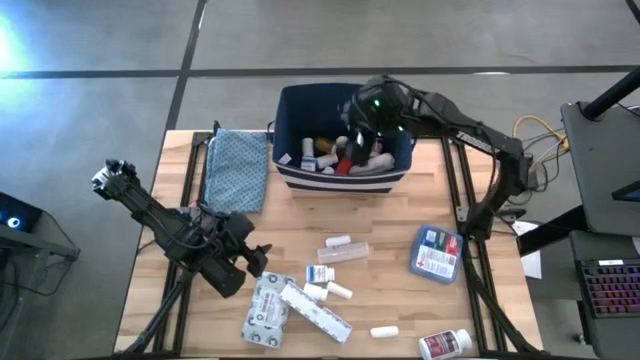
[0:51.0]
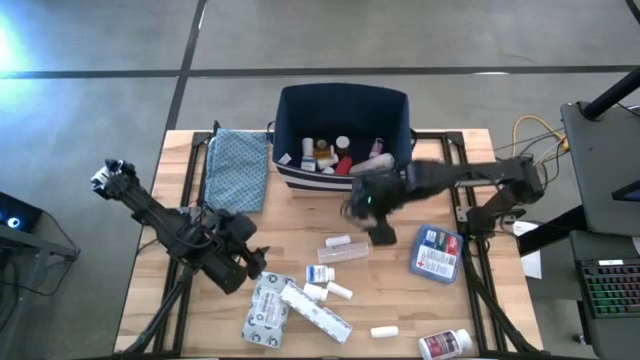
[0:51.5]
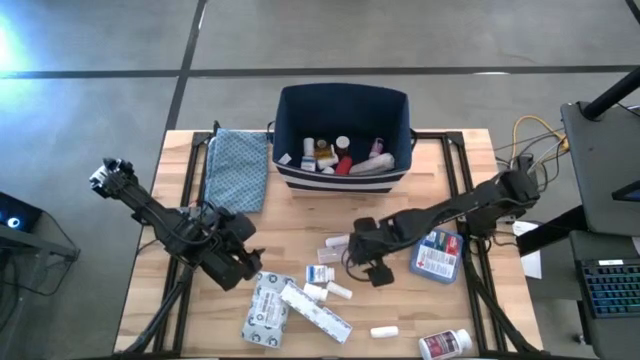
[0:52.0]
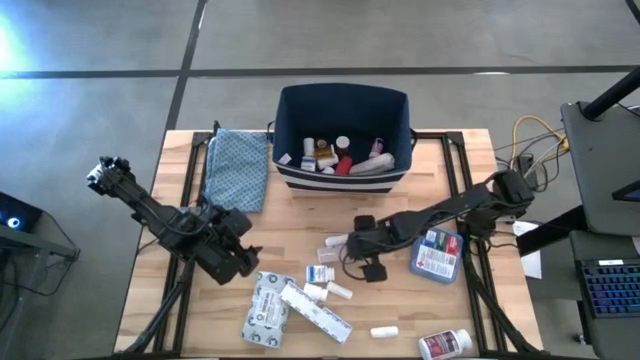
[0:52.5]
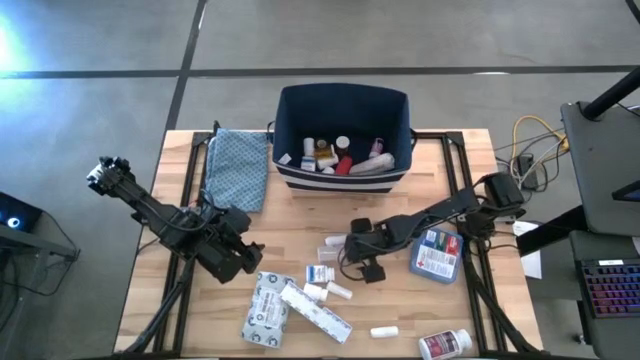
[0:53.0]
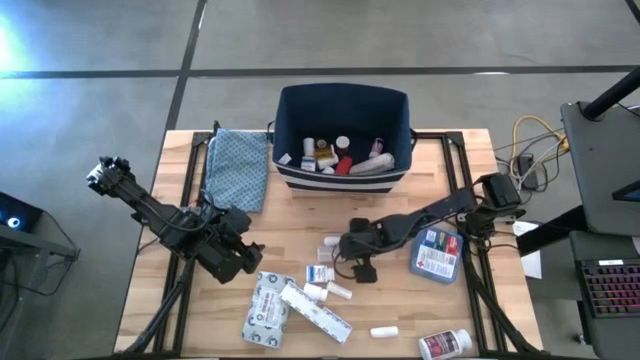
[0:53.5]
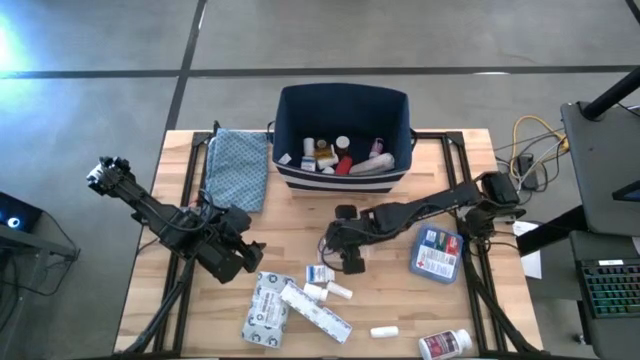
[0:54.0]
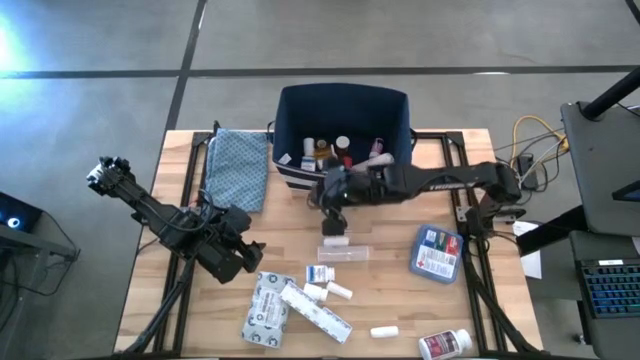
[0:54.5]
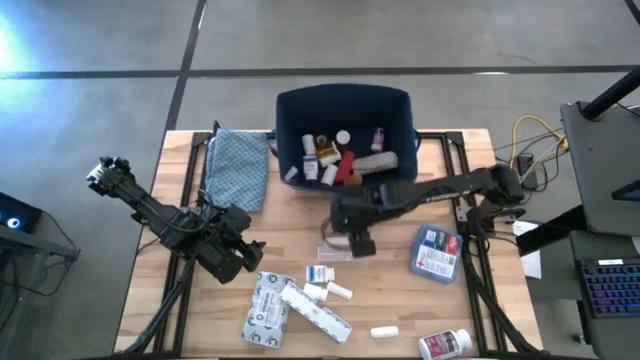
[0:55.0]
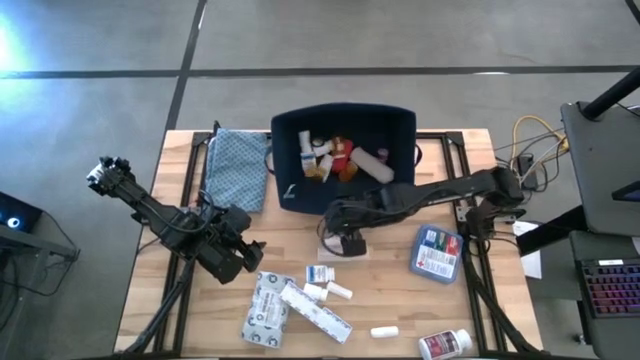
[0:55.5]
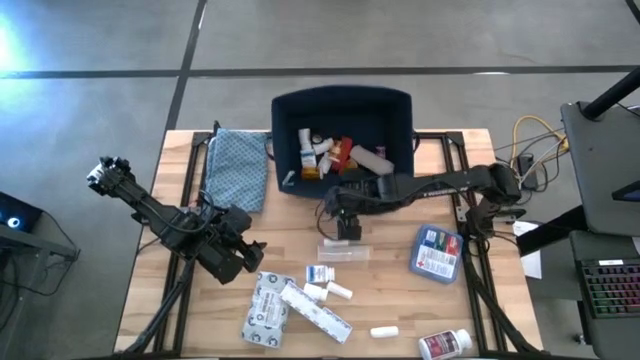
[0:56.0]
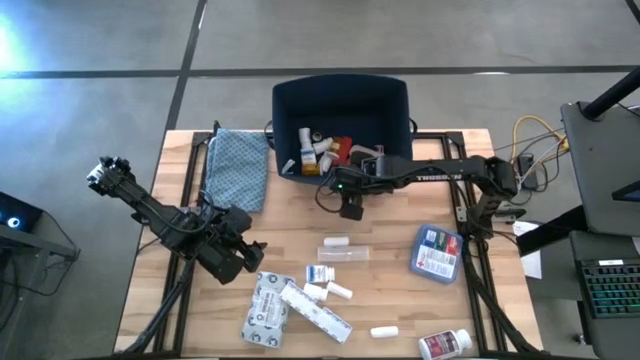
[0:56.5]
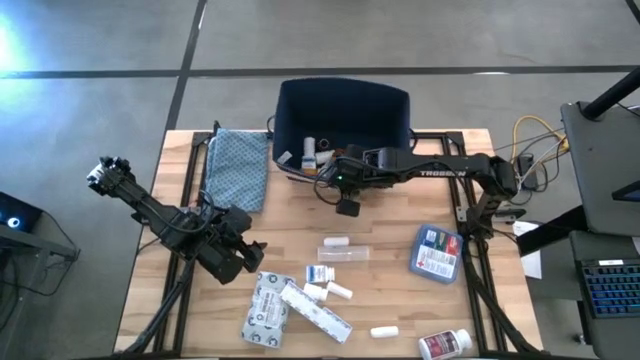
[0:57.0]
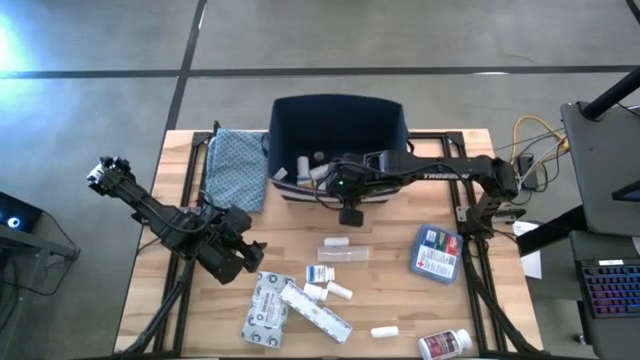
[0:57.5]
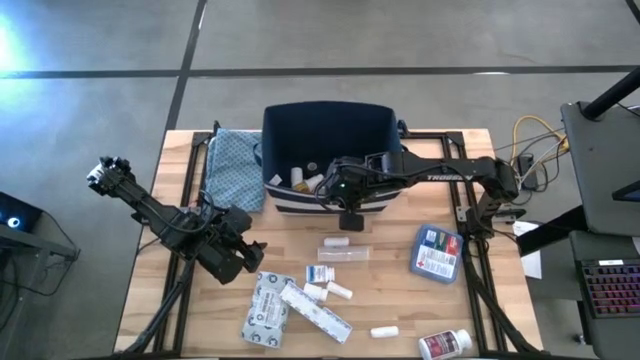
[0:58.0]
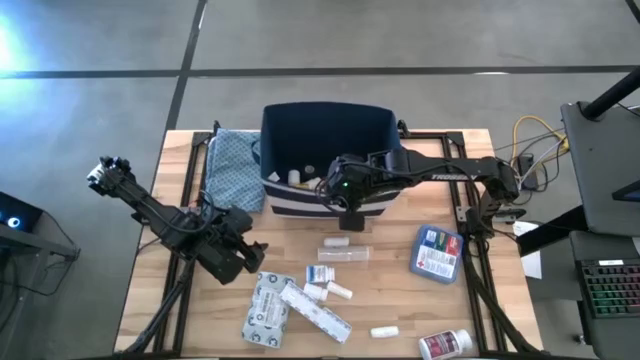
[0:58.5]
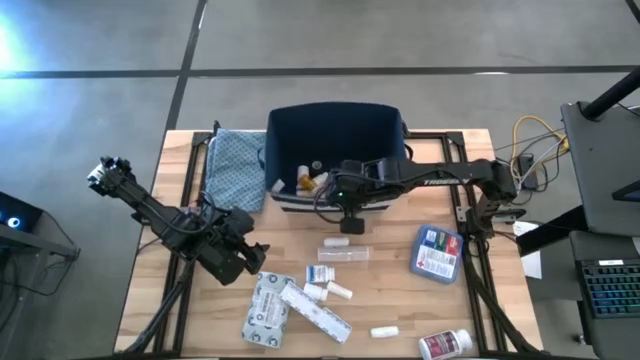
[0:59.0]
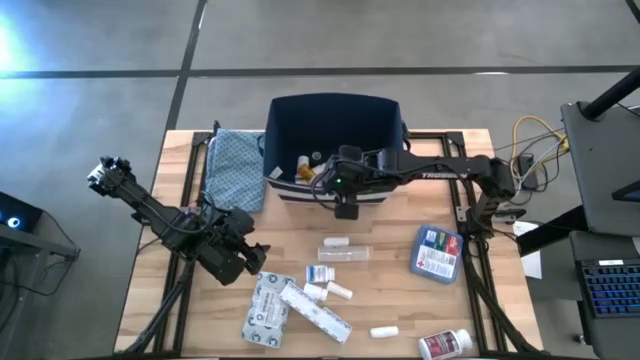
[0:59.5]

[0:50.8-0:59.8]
Task: Pick & place medical supplies in basket/bin
Adjust the bin on the top table

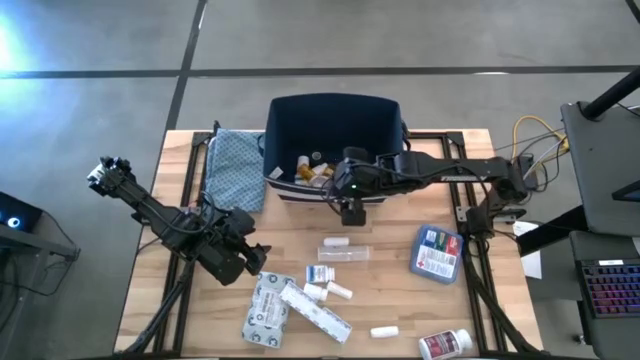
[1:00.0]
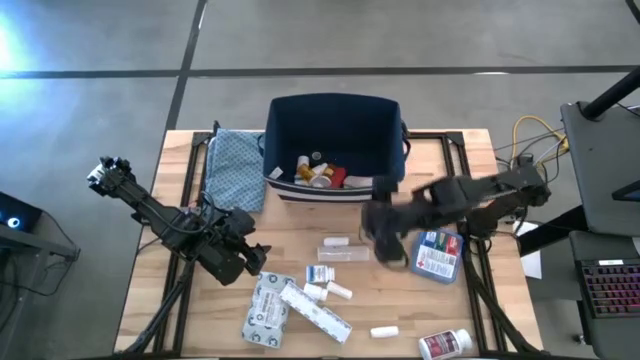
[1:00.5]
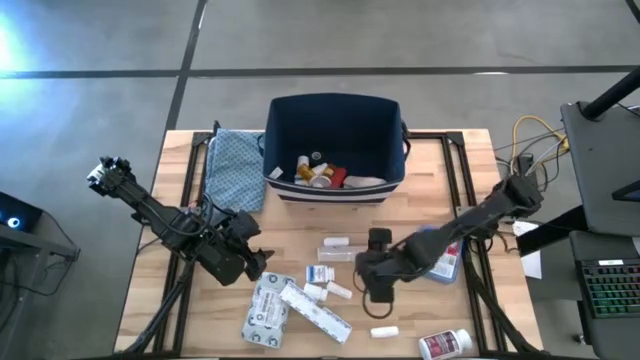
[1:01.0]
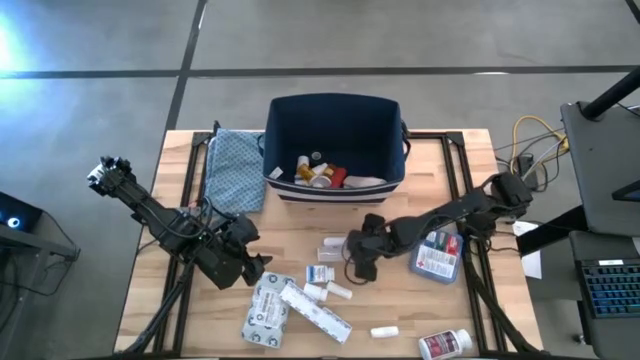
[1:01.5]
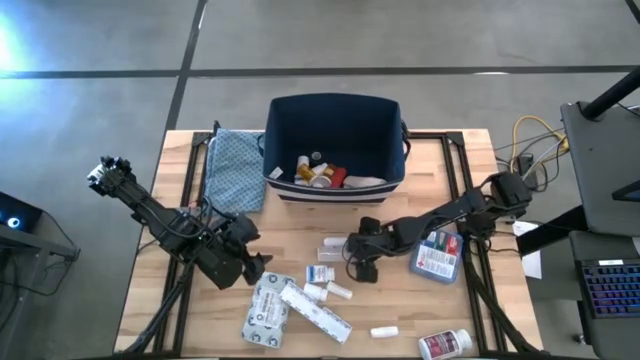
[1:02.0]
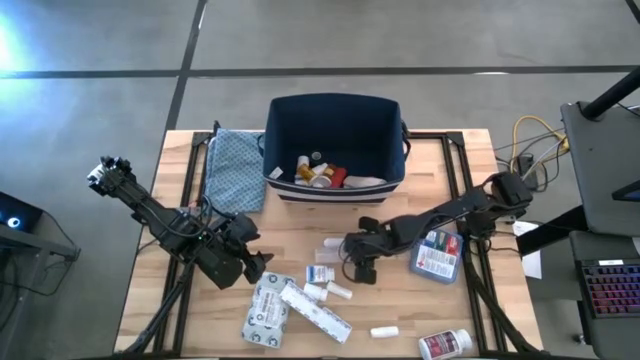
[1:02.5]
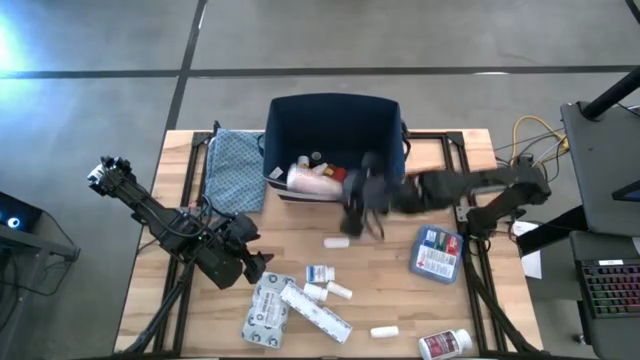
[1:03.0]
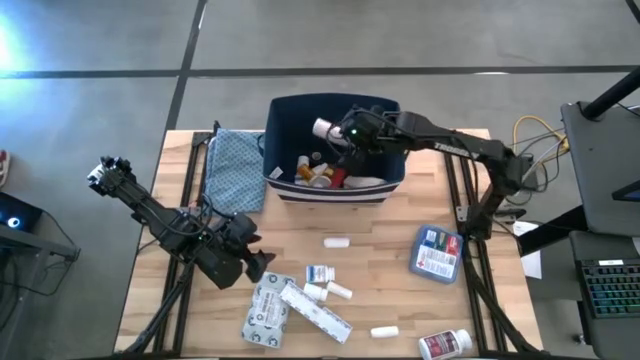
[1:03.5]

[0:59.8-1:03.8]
Put the brown bandage into the bin

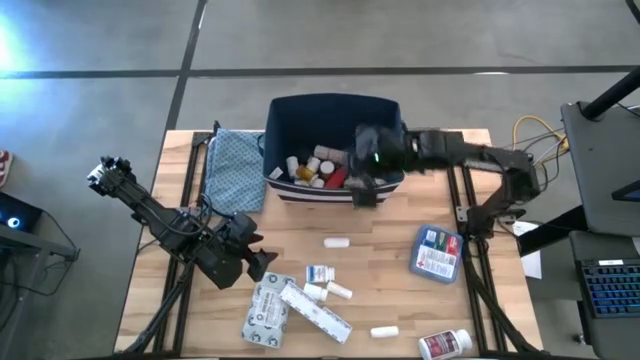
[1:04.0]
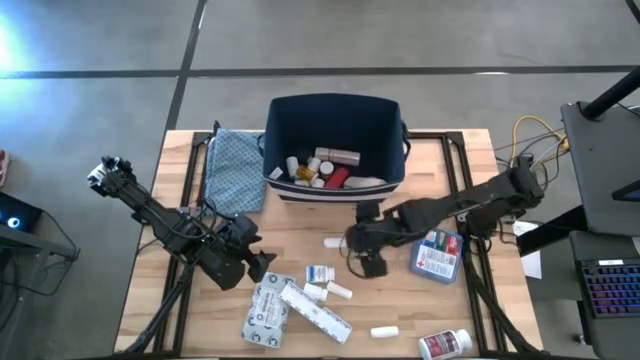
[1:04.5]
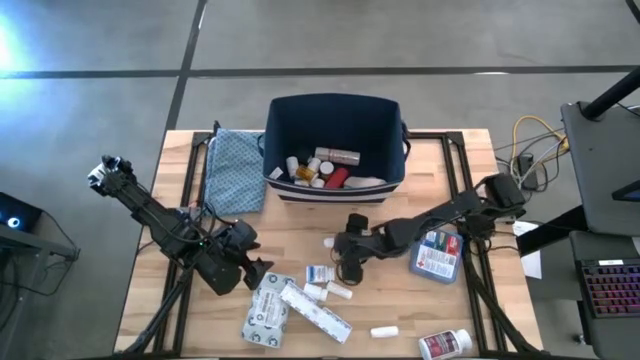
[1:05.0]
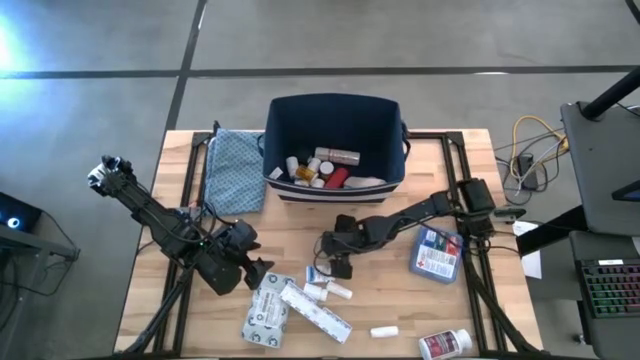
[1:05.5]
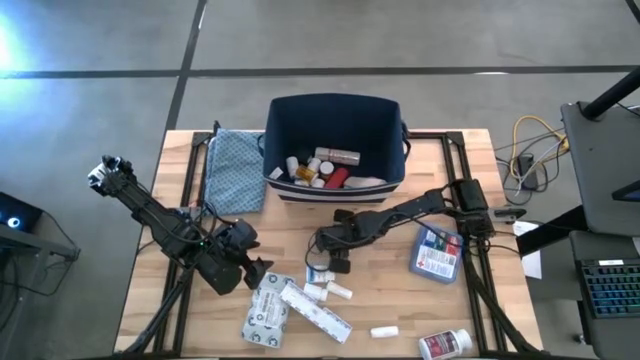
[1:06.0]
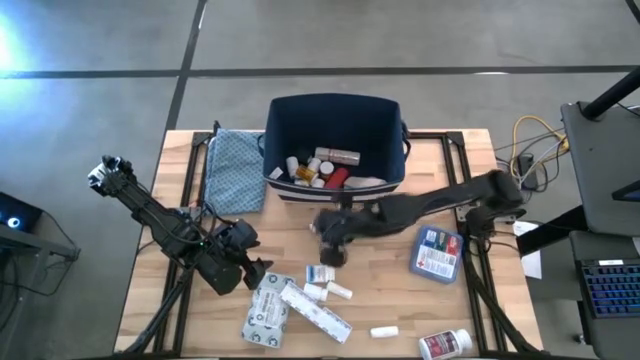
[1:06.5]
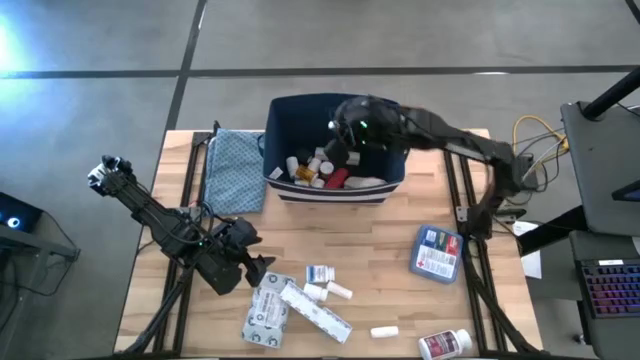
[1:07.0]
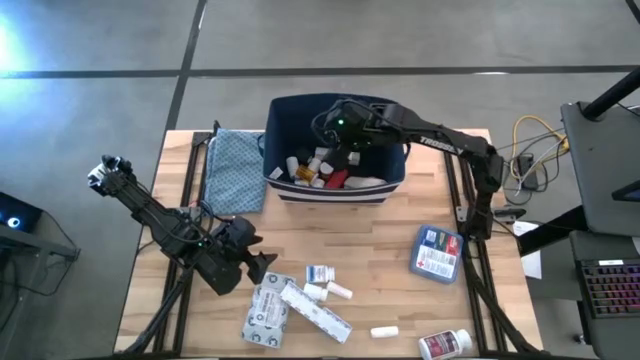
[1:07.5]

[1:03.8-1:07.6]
Put the white bandage into the bin

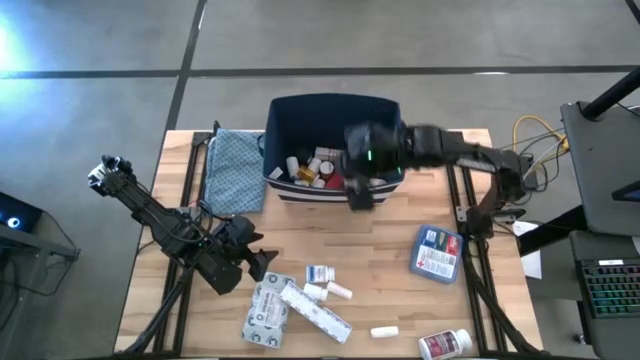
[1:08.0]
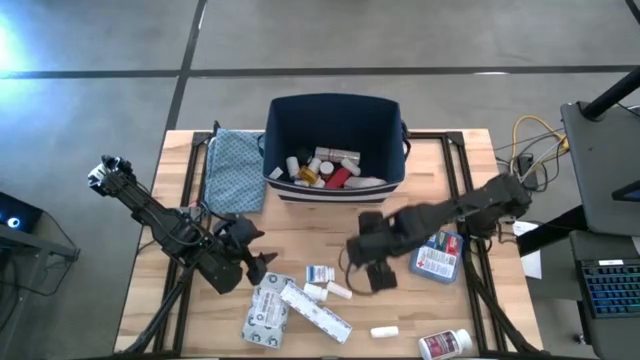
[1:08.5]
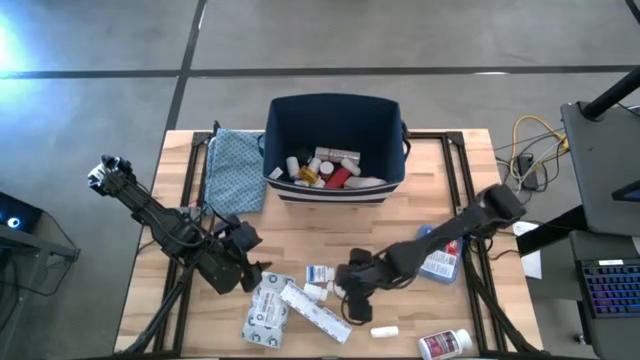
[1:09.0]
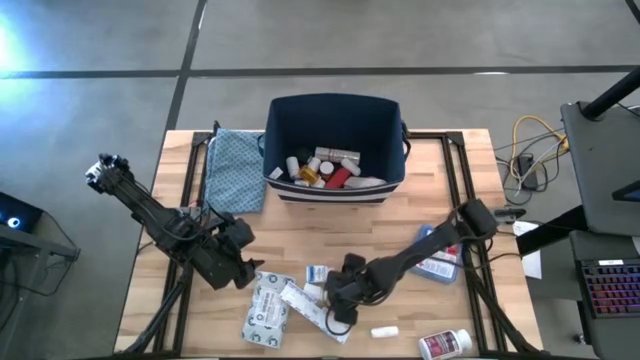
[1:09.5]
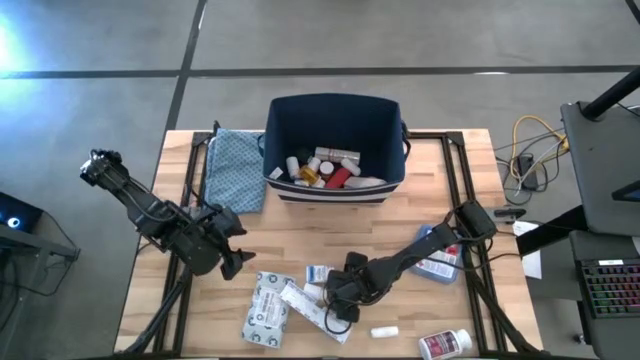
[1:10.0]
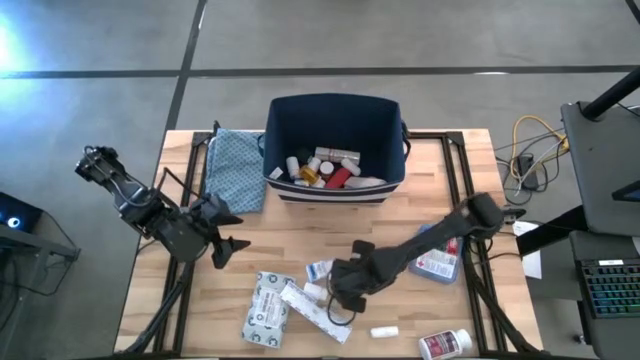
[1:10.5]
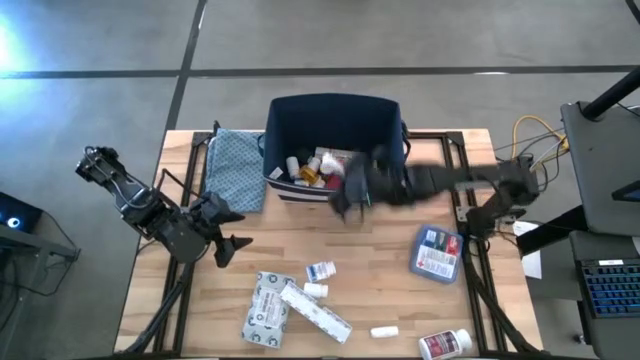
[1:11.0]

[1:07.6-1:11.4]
Put the white roll gauze into the bin
